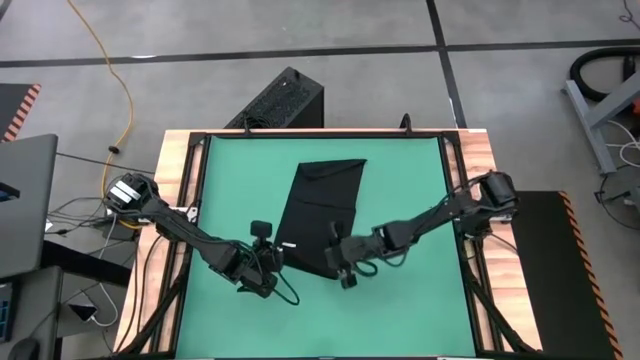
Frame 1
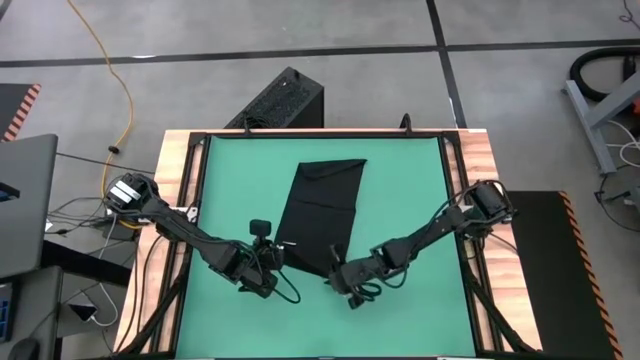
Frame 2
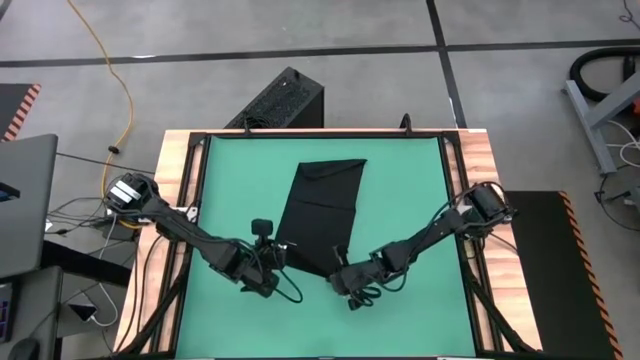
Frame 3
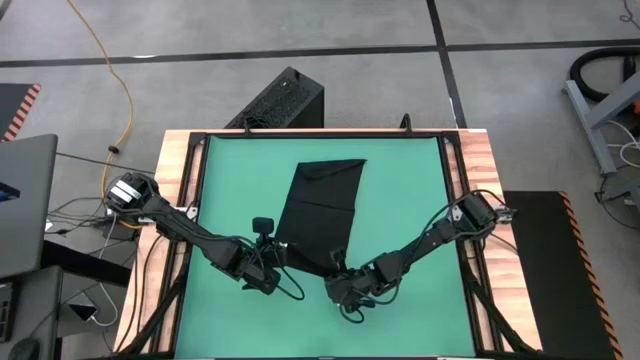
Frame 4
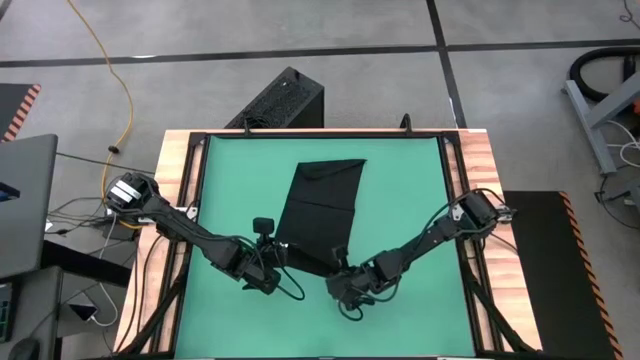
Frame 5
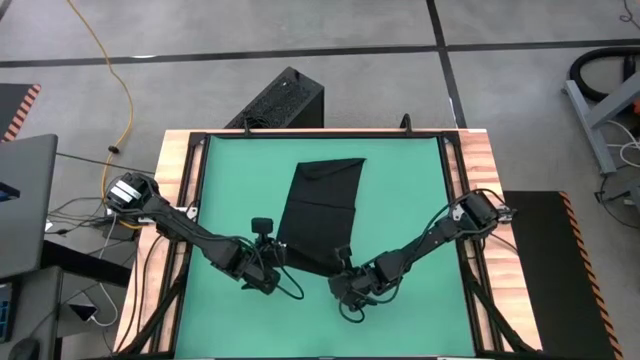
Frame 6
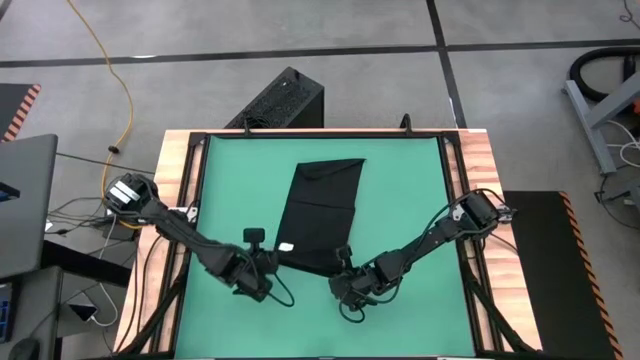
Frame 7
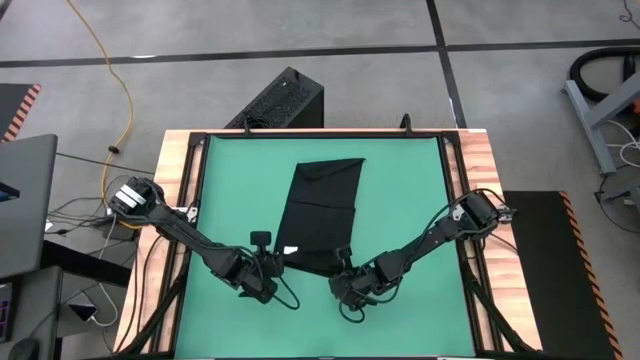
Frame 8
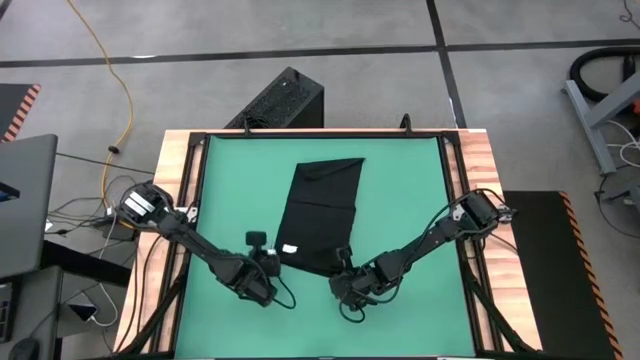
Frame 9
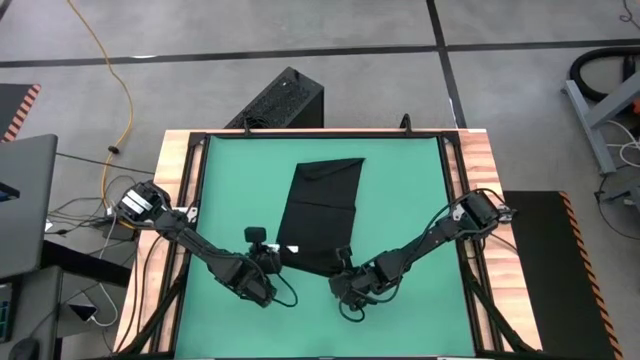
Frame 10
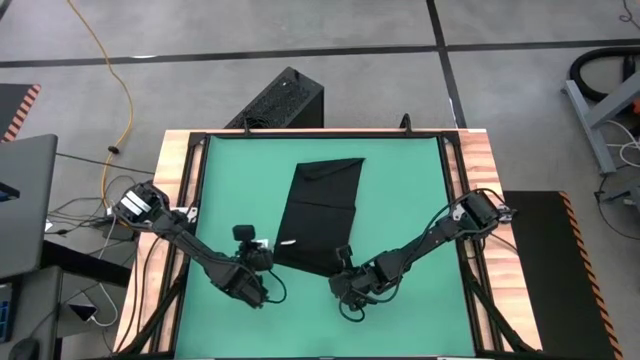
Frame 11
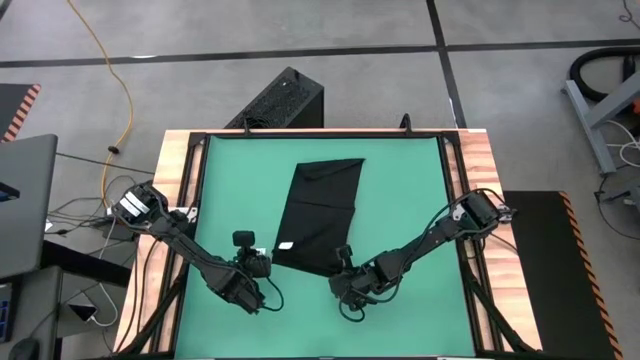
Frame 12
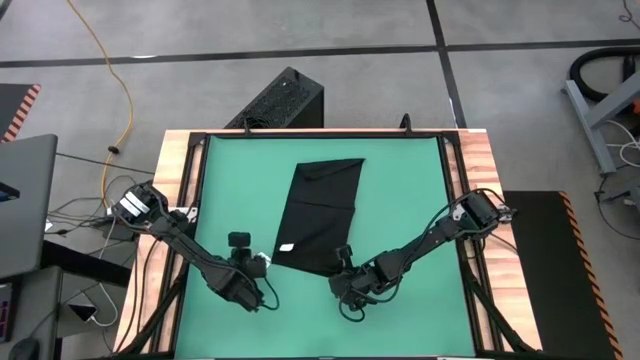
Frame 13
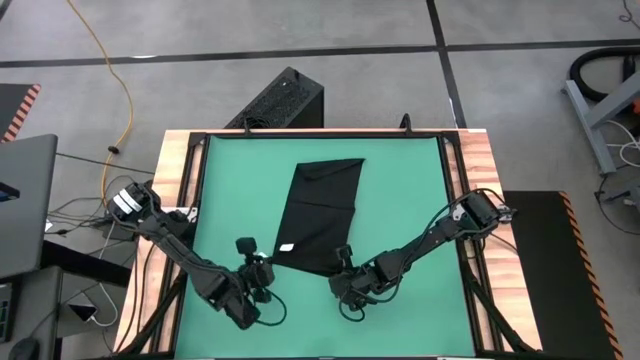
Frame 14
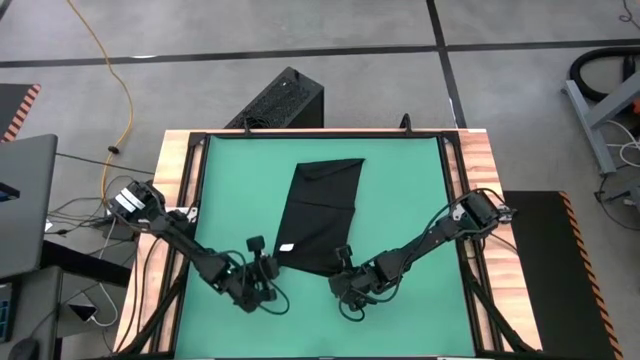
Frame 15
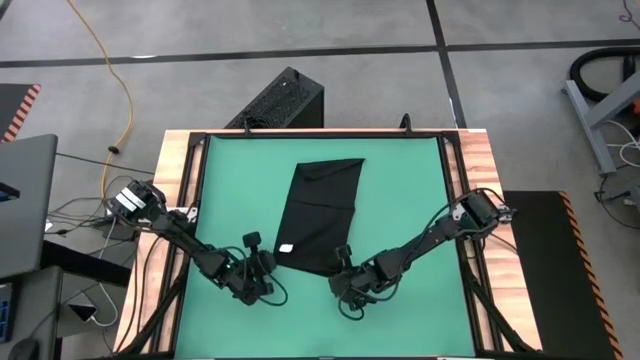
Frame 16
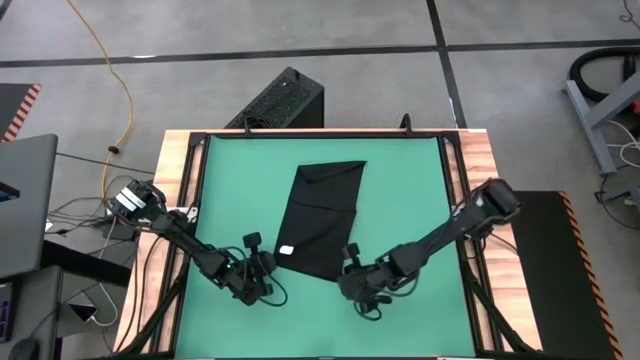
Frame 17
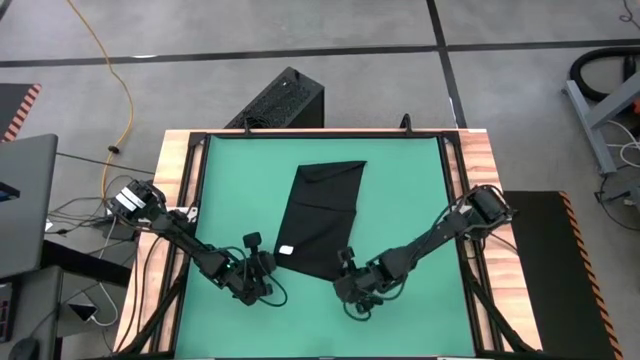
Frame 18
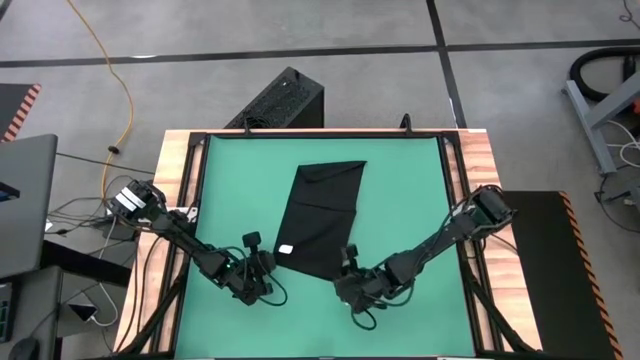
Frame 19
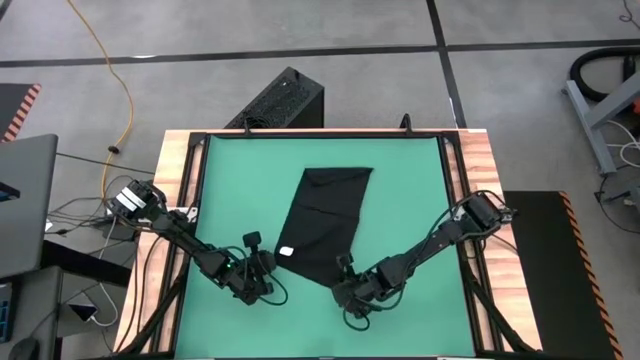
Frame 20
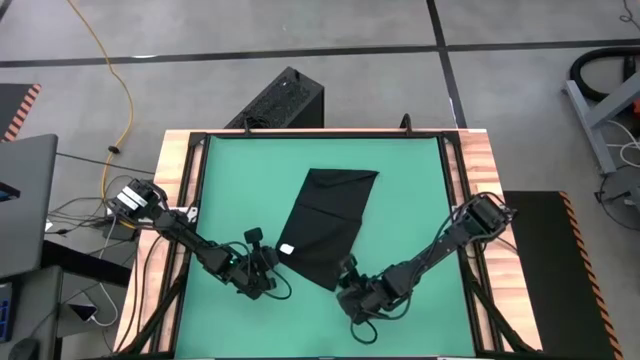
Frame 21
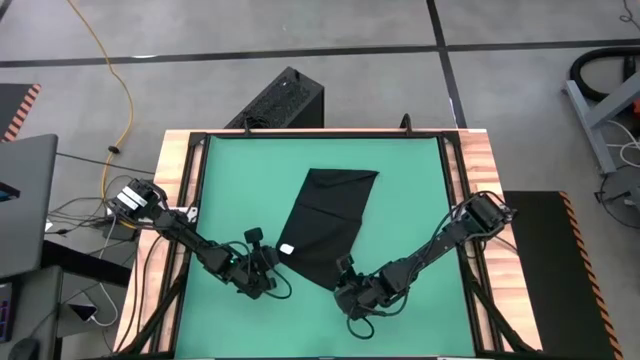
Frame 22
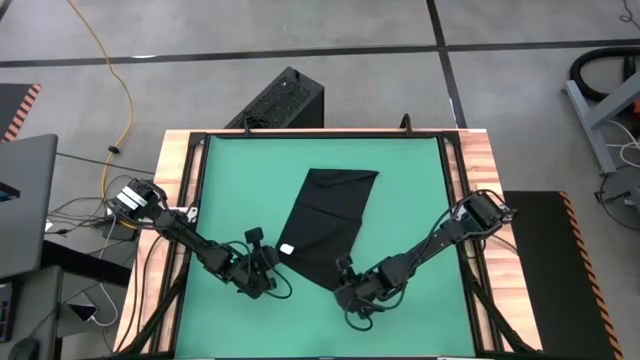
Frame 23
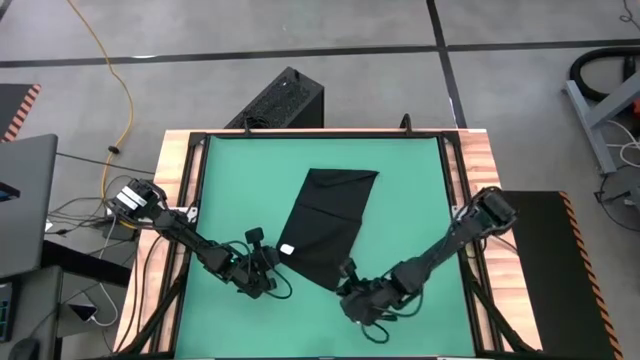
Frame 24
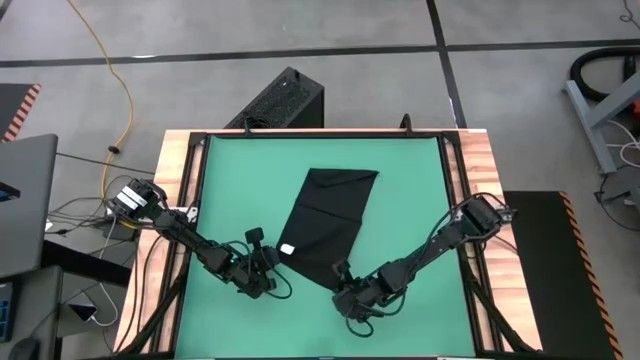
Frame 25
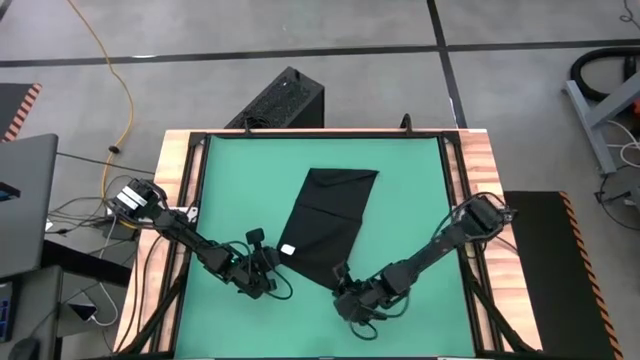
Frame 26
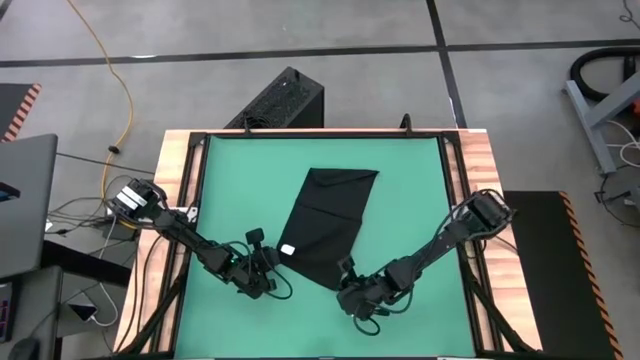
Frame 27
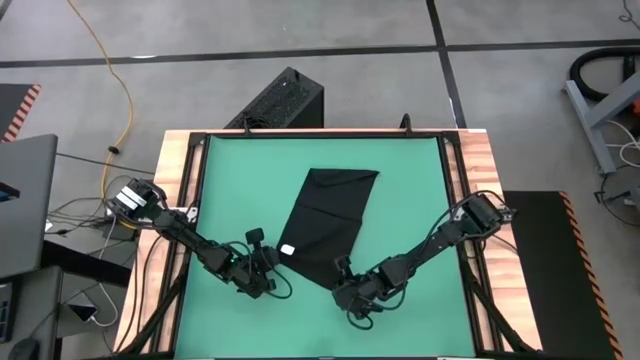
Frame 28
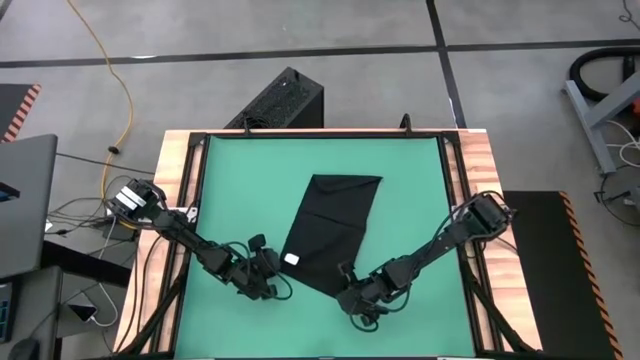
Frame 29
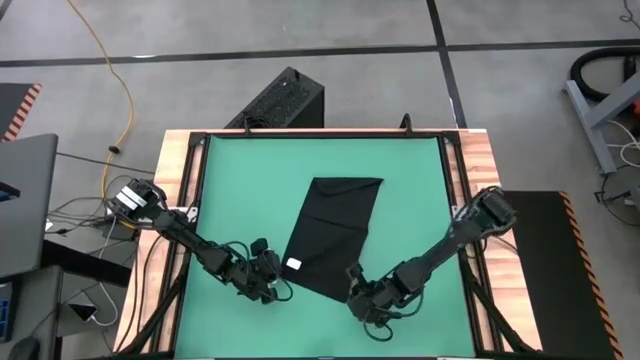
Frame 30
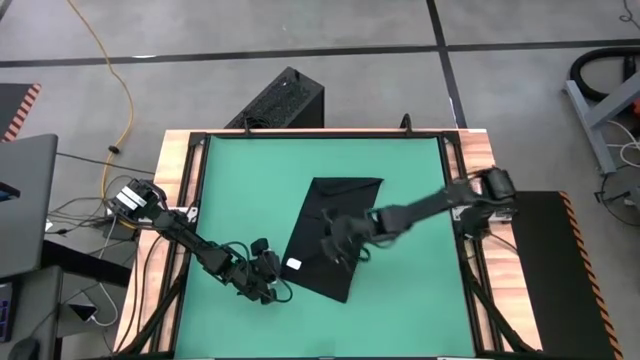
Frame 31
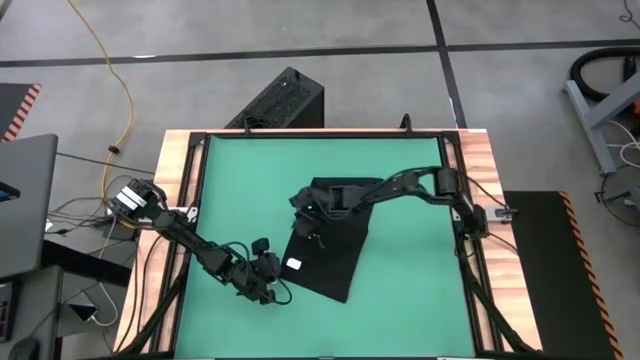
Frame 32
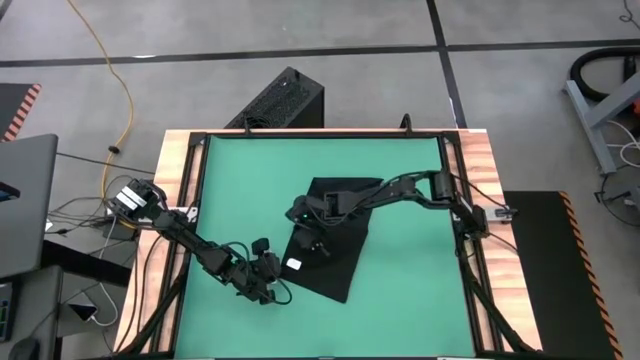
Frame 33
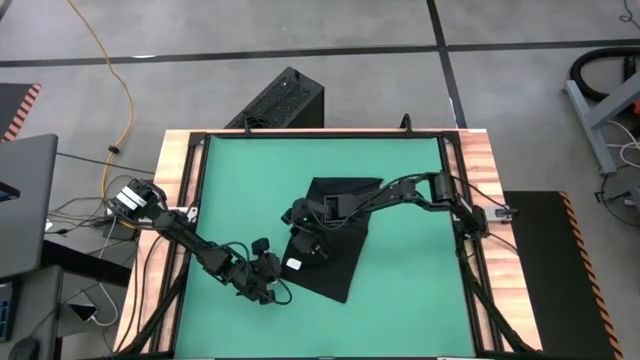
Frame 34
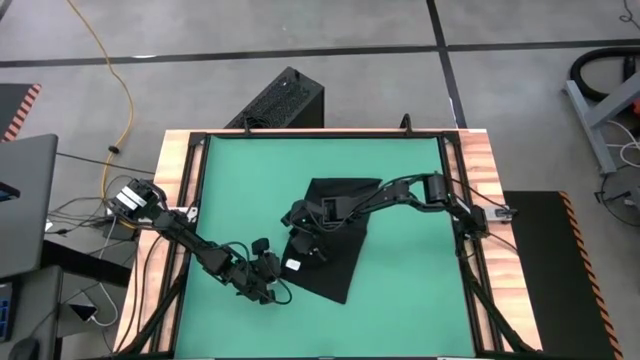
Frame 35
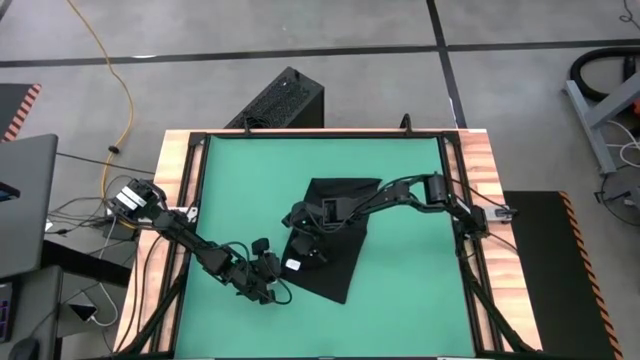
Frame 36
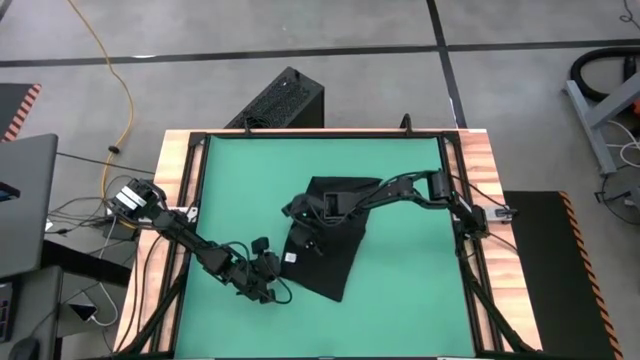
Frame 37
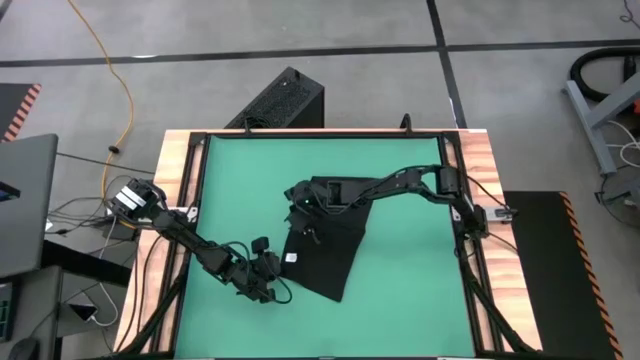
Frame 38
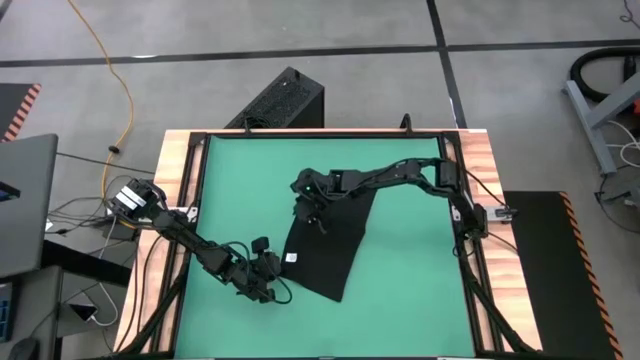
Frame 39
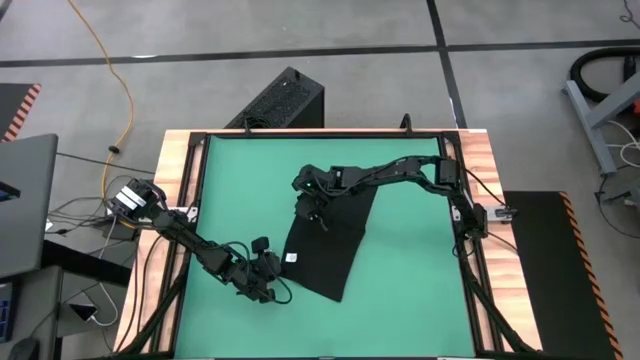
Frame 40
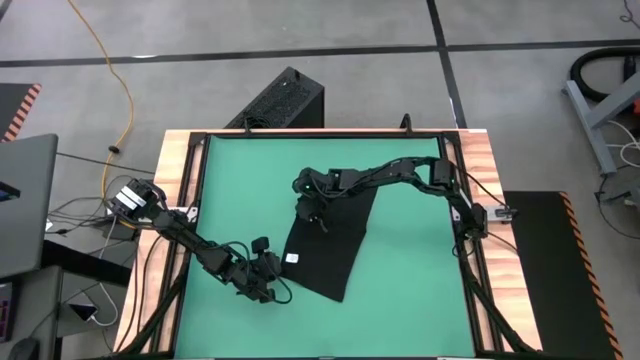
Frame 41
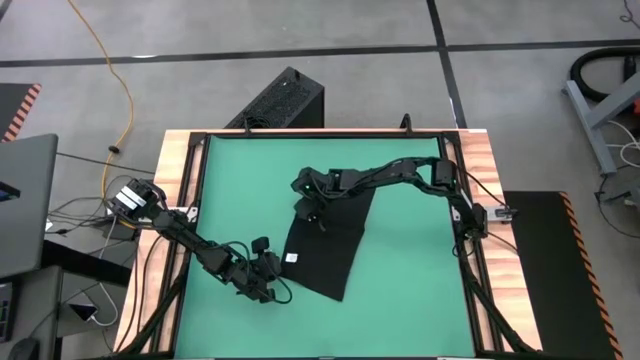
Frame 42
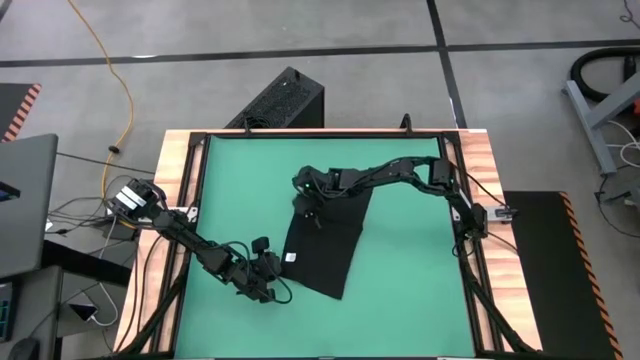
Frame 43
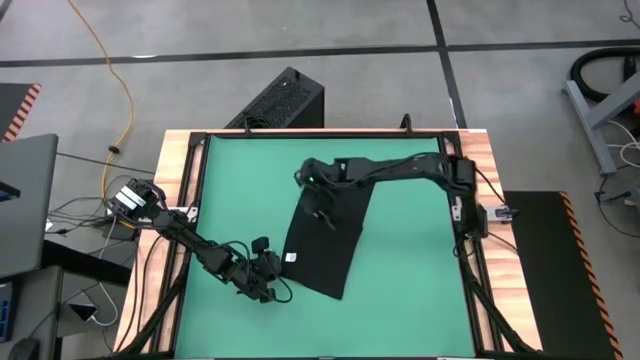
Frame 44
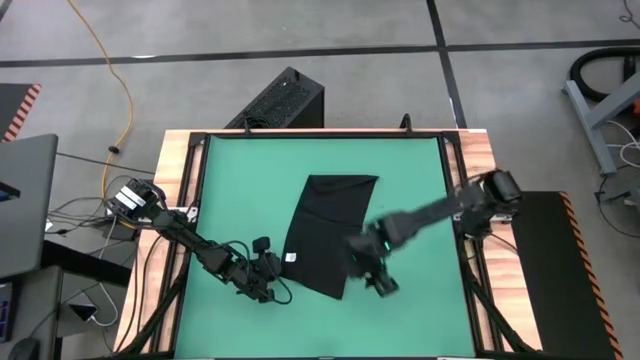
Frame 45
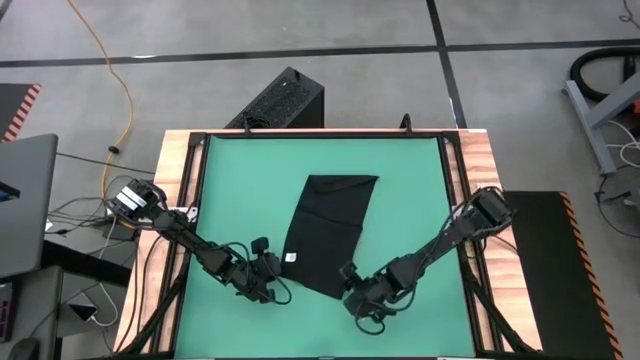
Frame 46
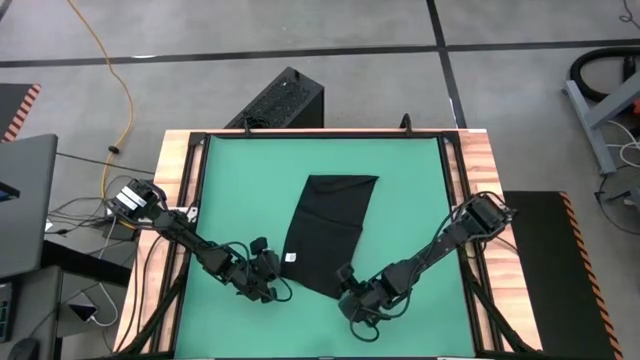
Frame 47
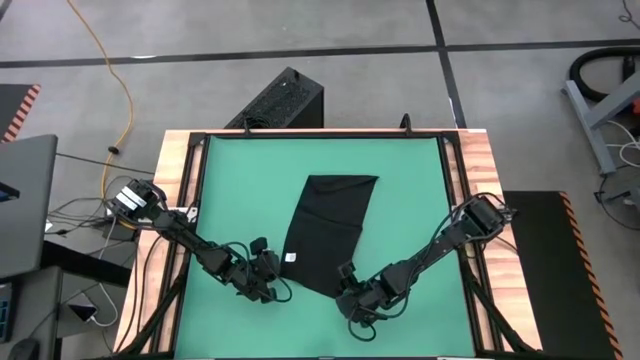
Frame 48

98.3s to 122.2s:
Task: Roll towel into tight, uniform cylinder
Roll the black towel
